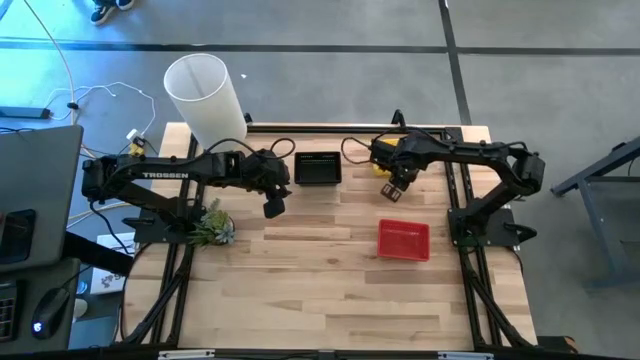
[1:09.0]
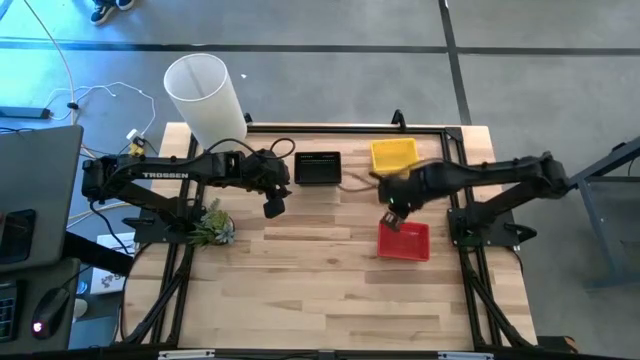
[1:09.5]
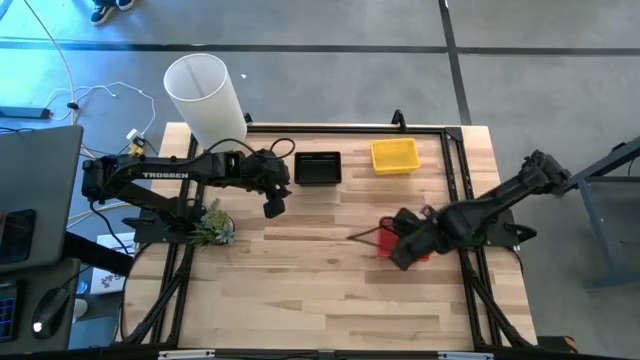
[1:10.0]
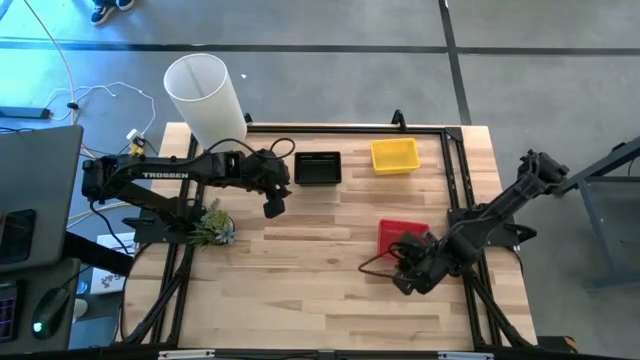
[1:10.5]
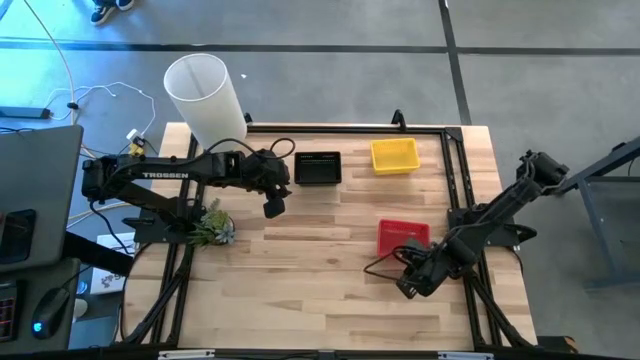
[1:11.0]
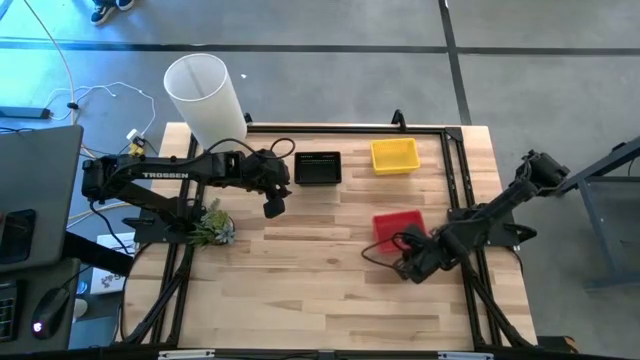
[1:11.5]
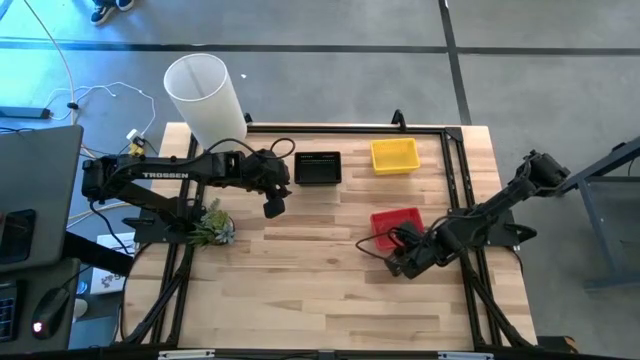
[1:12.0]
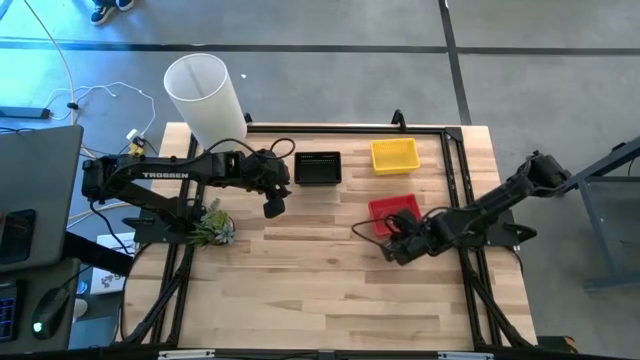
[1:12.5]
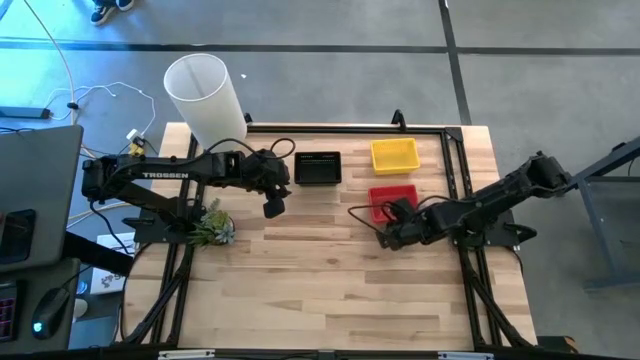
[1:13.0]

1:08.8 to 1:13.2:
Adjust the stacked red bins

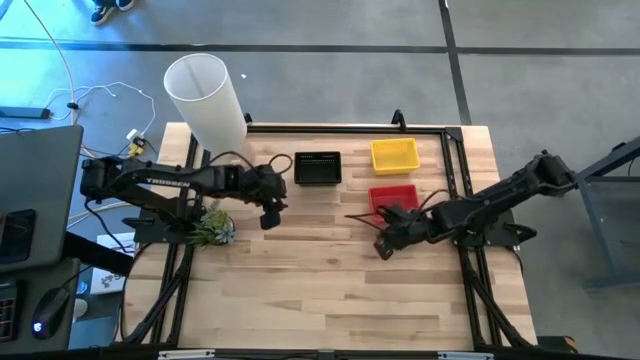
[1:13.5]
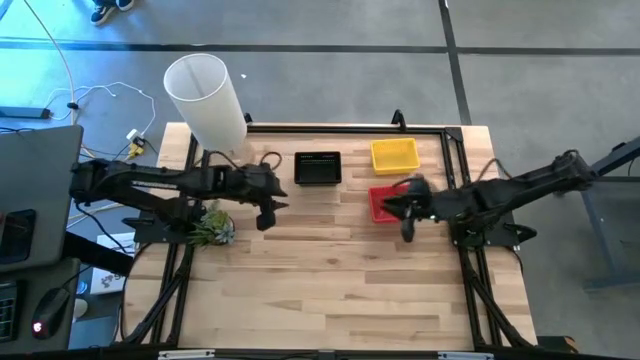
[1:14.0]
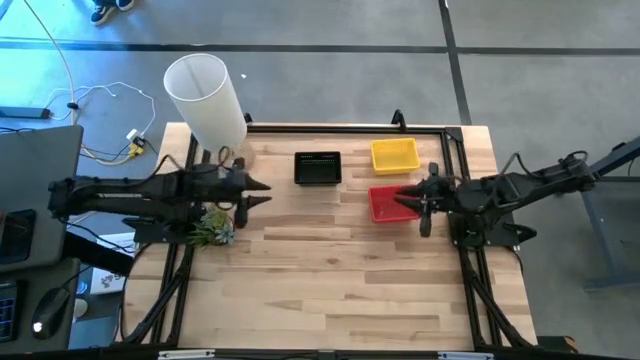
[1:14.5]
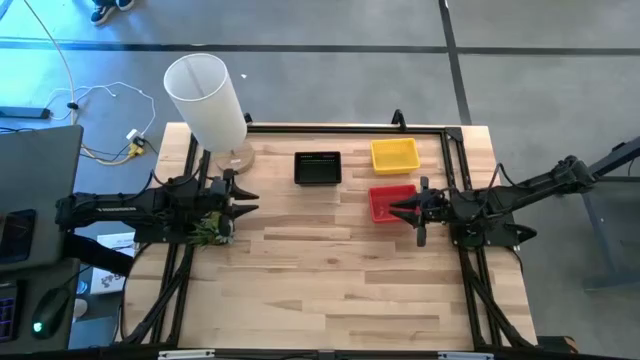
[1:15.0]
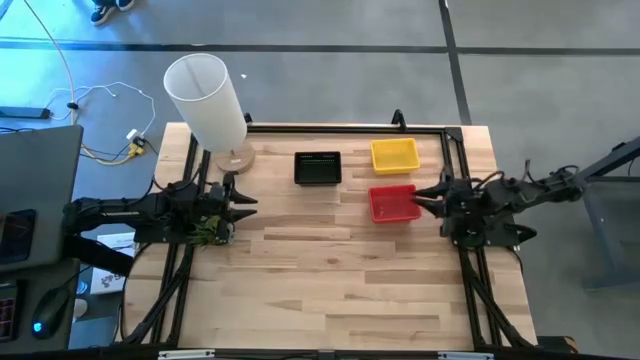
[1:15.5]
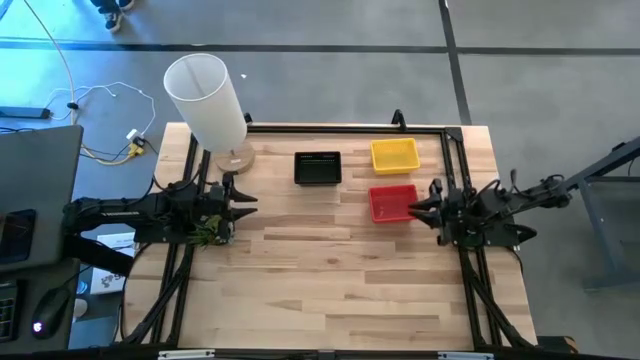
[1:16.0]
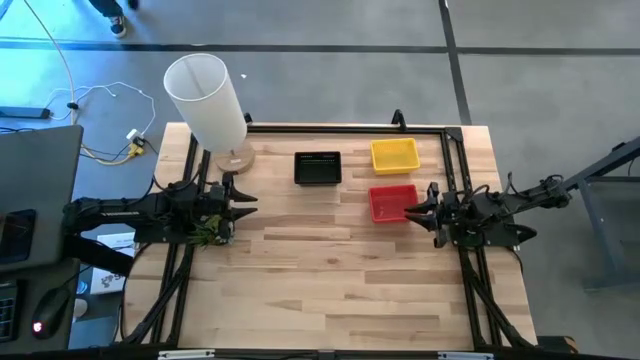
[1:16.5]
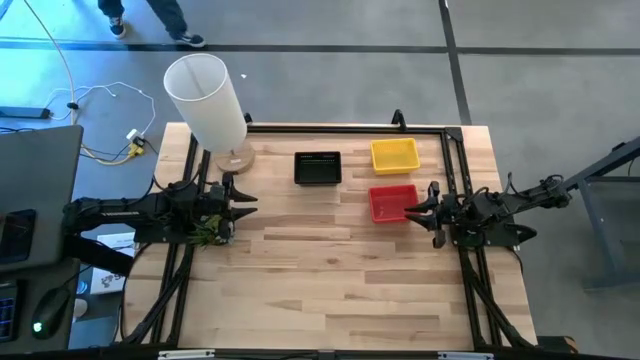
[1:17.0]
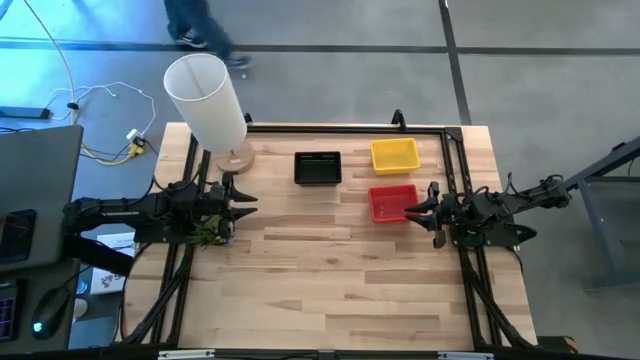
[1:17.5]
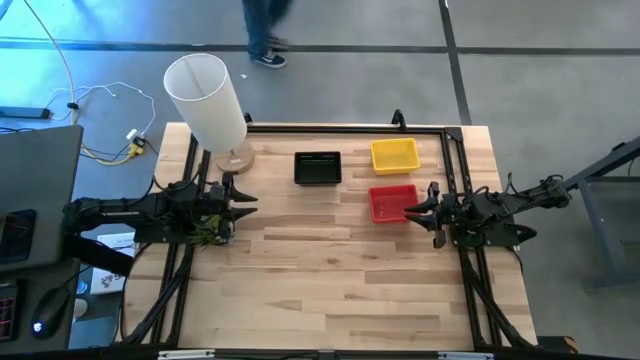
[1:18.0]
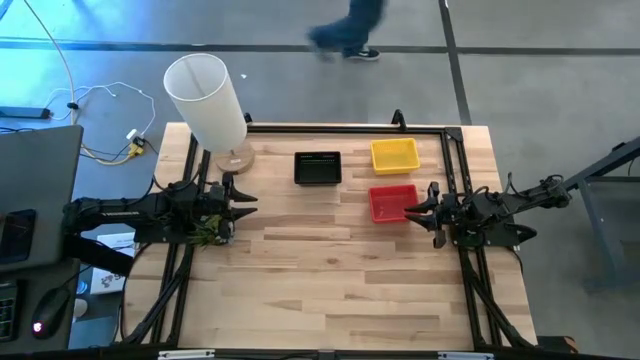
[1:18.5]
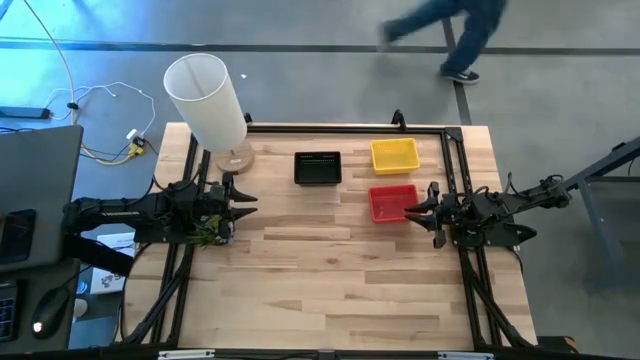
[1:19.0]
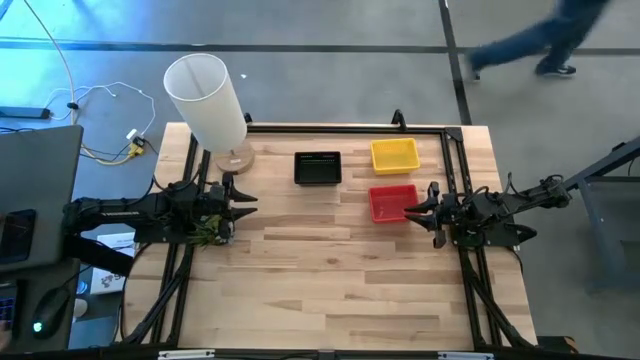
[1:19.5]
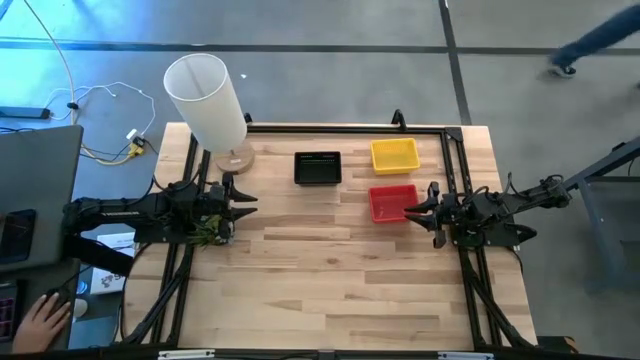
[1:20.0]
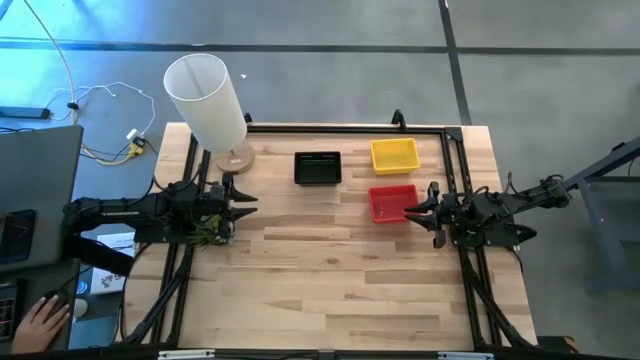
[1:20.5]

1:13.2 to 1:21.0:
Return to Home Position

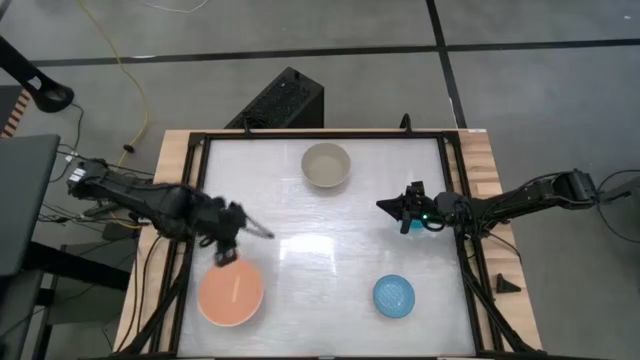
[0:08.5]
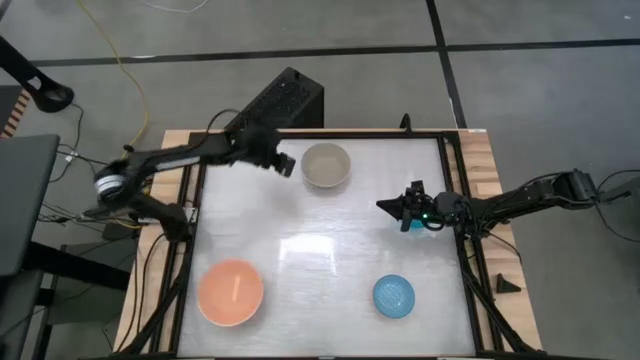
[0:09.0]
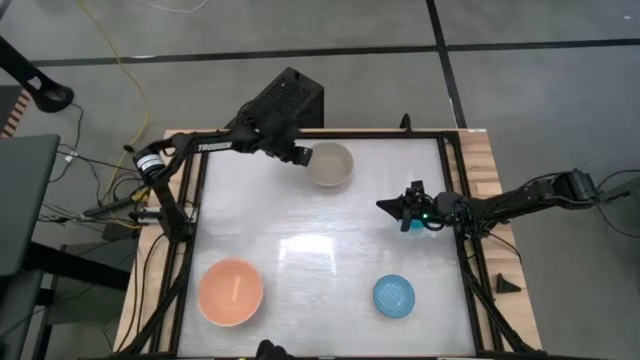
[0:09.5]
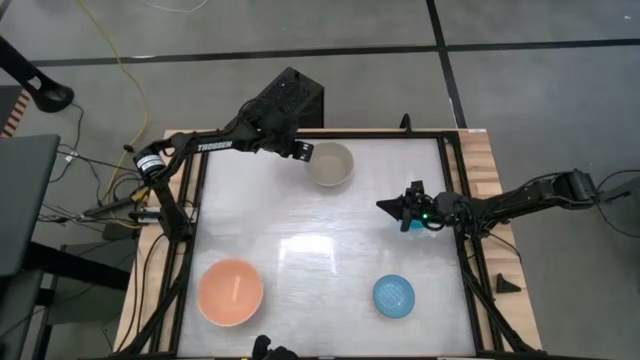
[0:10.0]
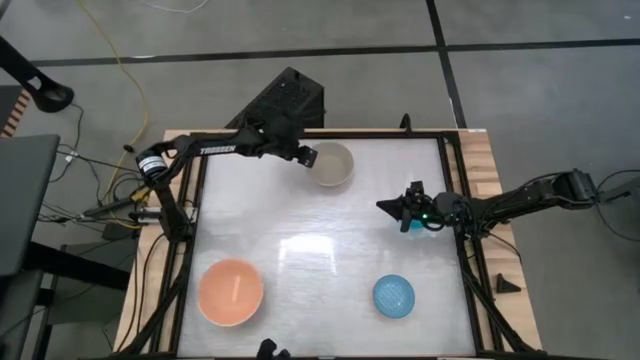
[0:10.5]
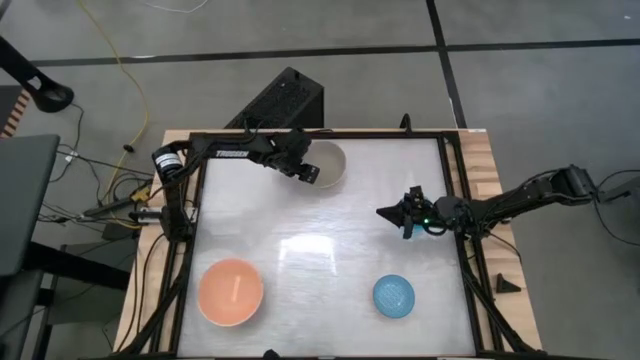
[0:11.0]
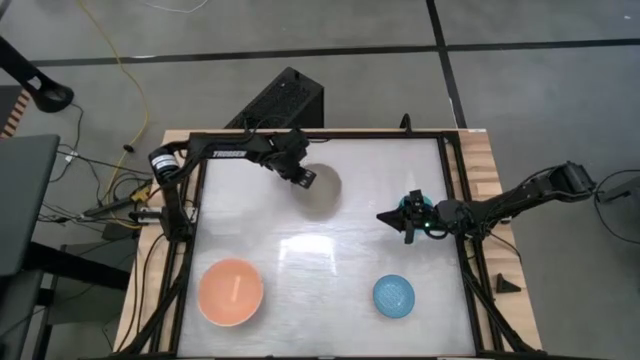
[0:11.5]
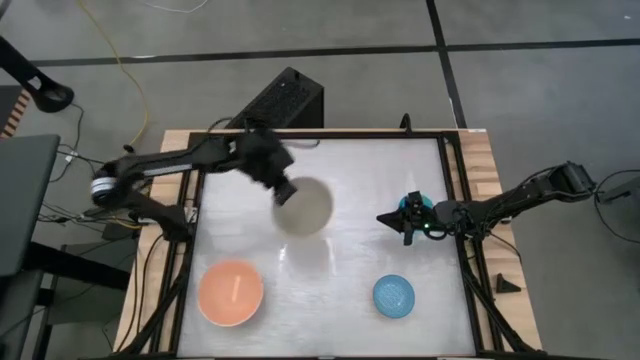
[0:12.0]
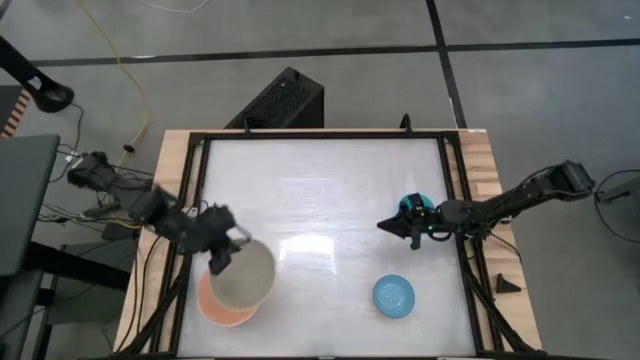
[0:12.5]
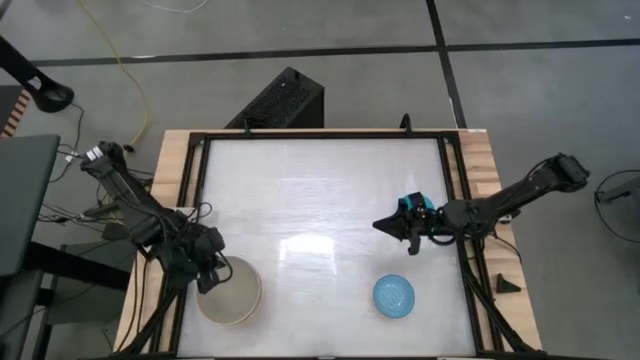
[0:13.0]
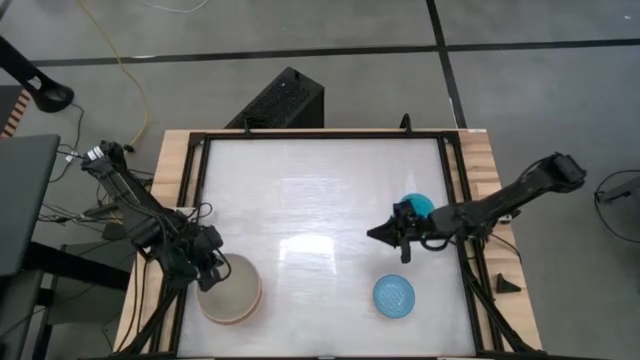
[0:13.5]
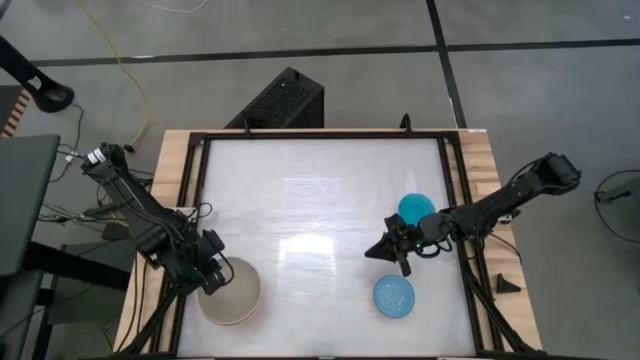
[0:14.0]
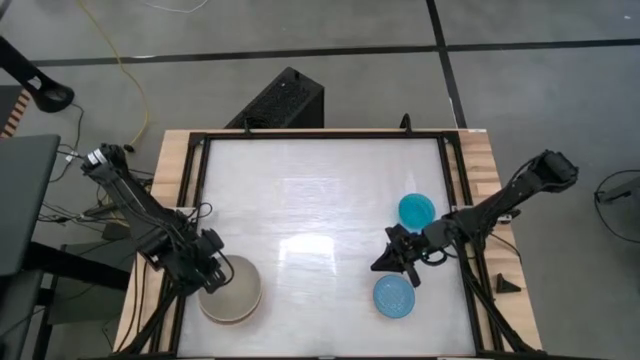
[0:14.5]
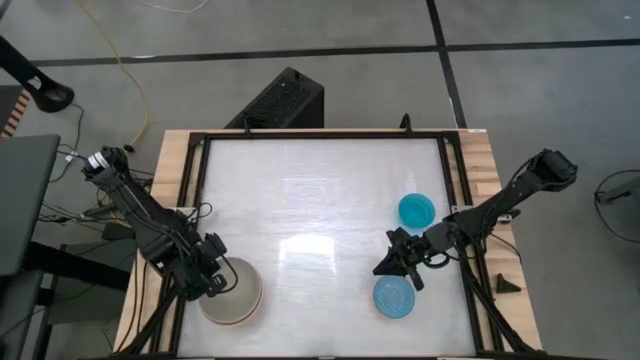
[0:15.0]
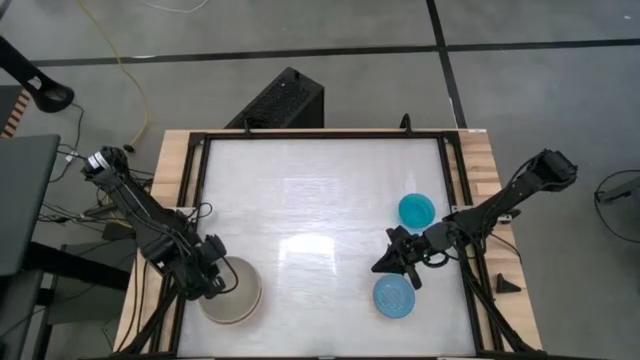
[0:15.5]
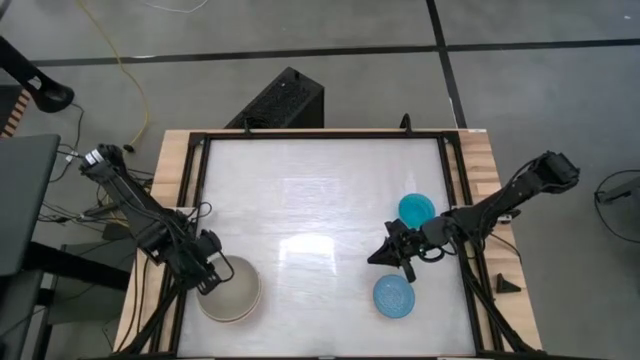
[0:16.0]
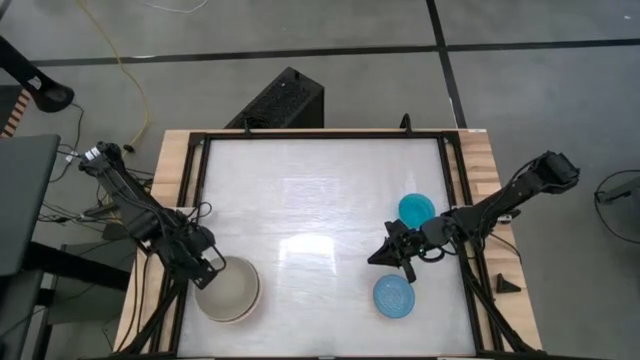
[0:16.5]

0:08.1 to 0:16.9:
Stack the gray bowl on top of the orange bowl
